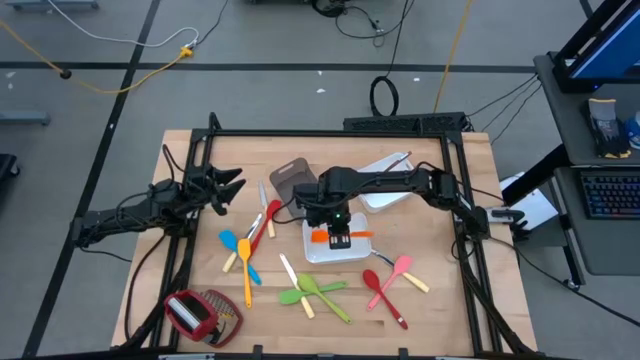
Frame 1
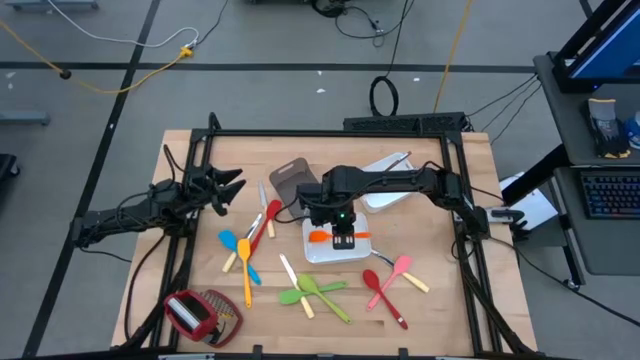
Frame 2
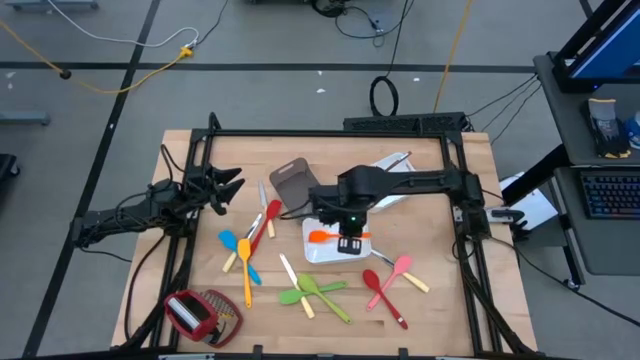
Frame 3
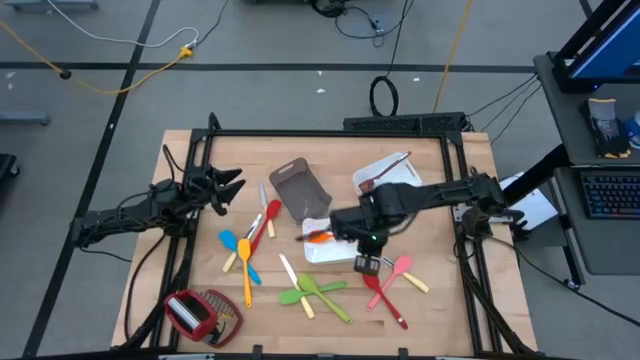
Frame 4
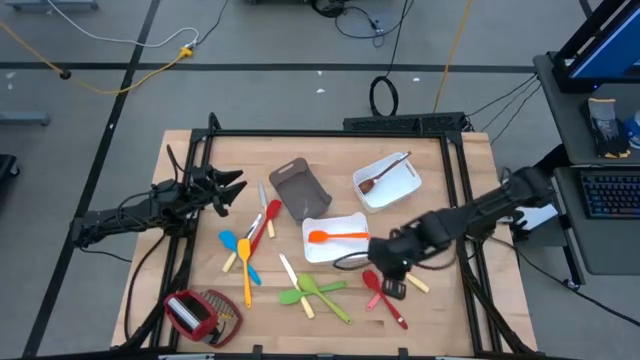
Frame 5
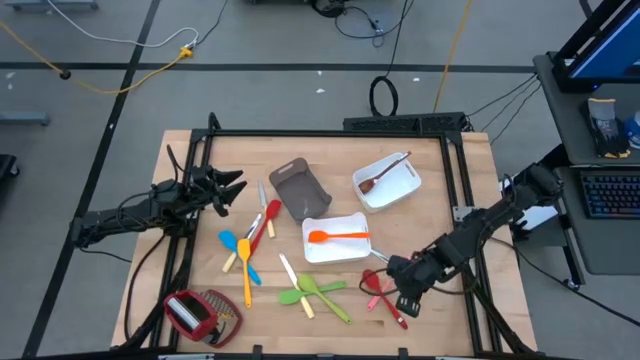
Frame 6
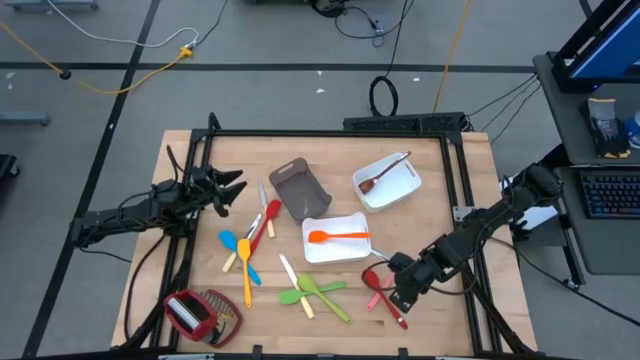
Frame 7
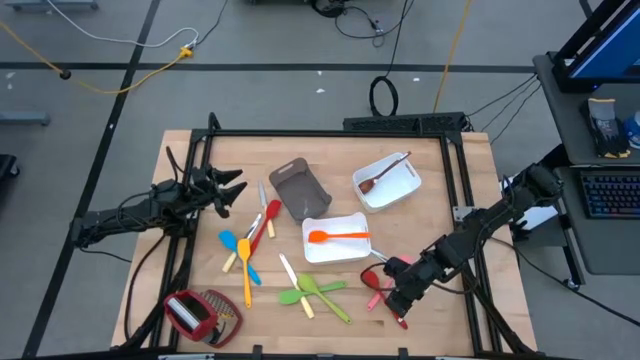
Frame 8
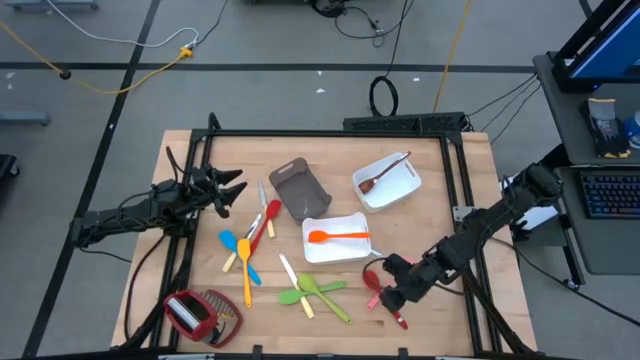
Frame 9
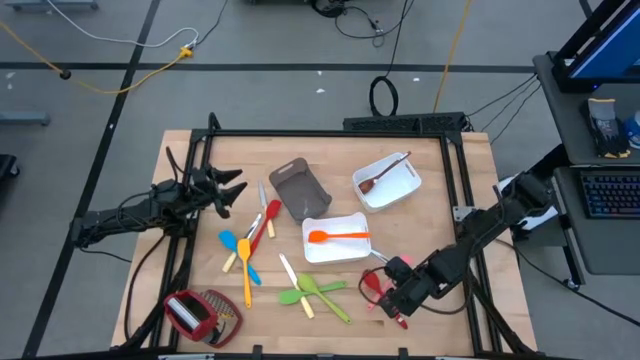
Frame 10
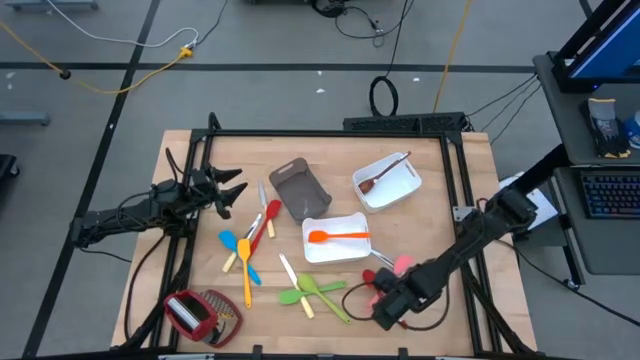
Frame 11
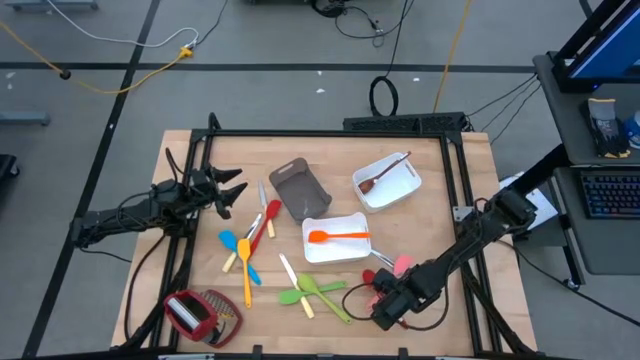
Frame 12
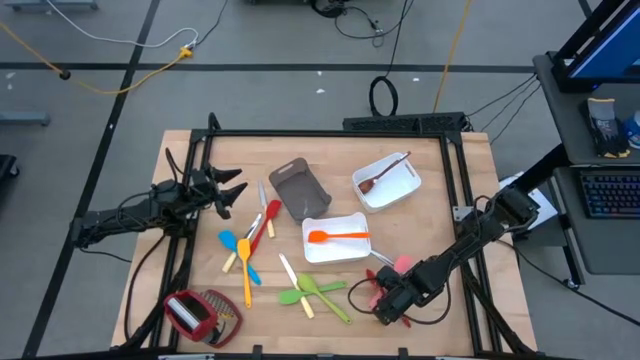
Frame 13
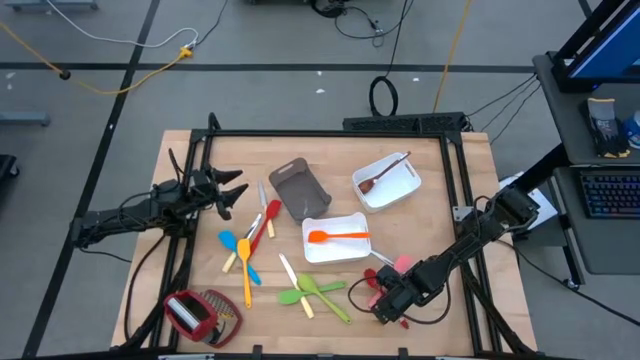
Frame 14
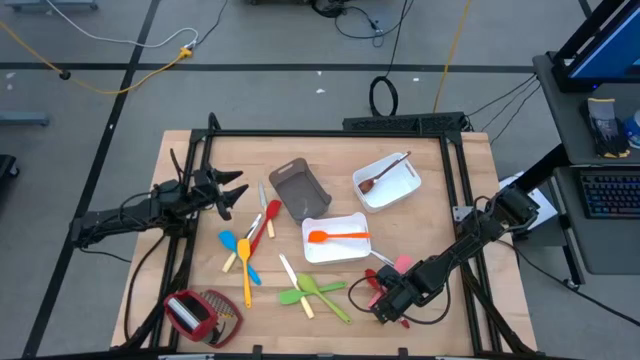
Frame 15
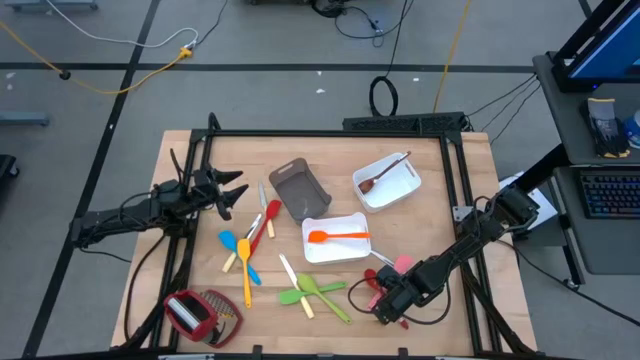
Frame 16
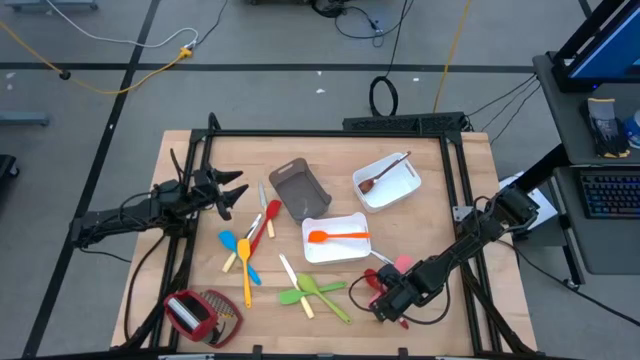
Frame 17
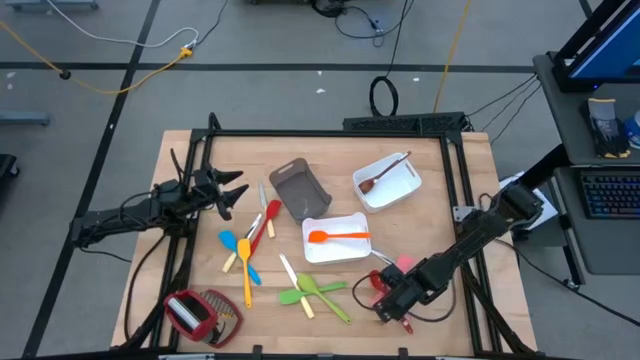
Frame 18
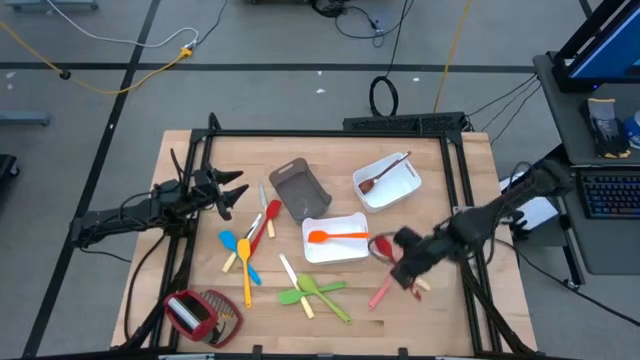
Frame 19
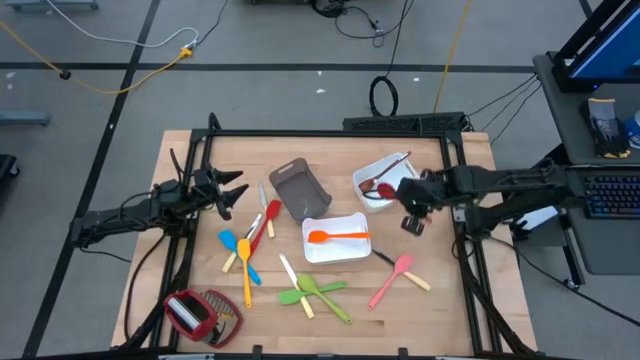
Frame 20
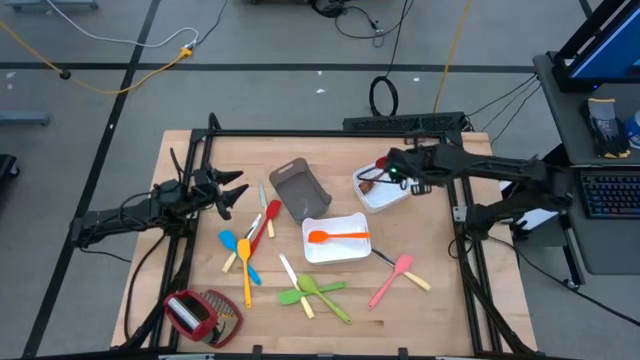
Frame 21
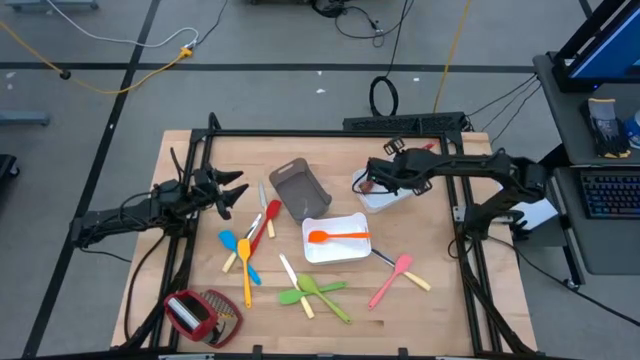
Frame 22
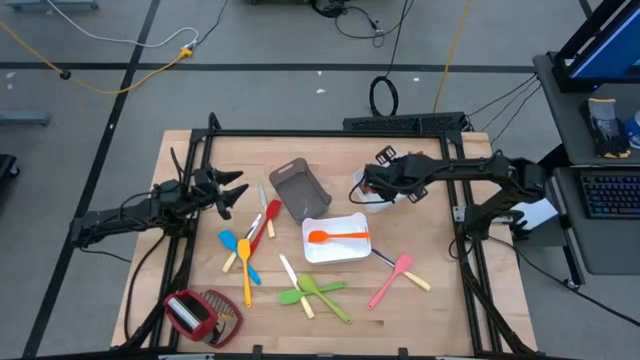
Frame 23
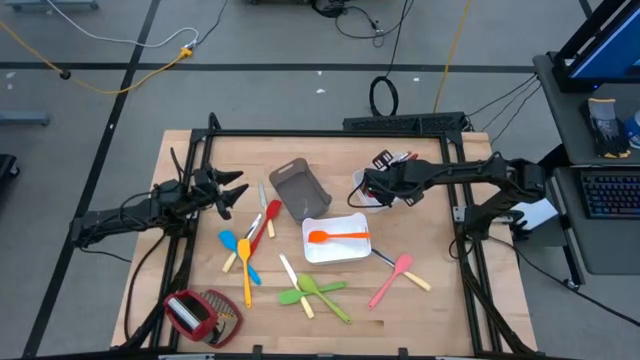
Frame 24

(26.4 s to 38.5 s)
Task: Pick & Place Kitchen Items
Put the red serving spoon into top white bin

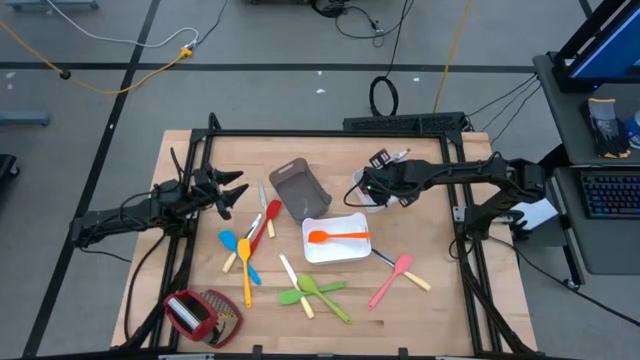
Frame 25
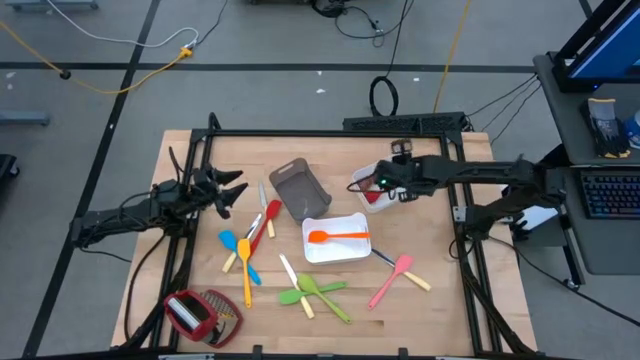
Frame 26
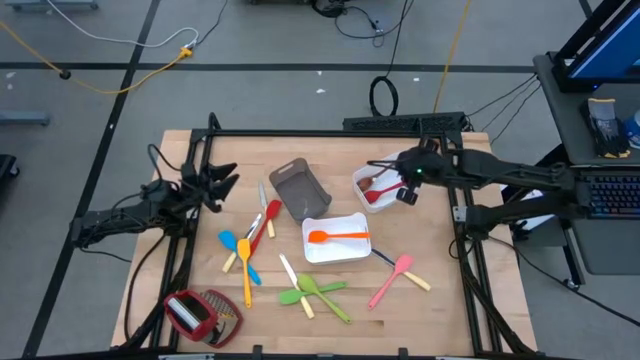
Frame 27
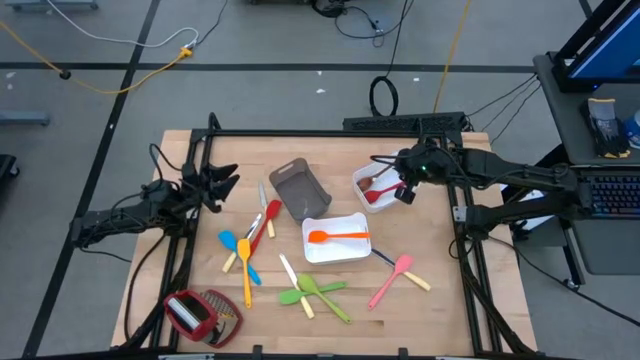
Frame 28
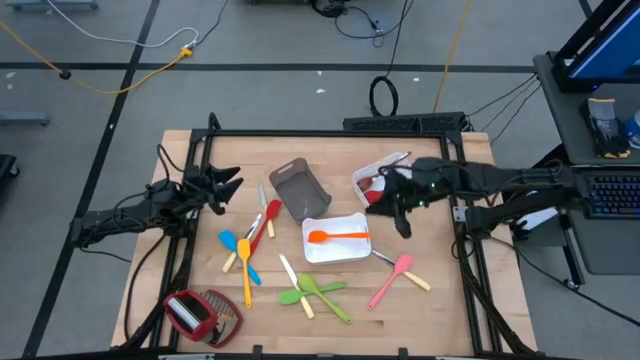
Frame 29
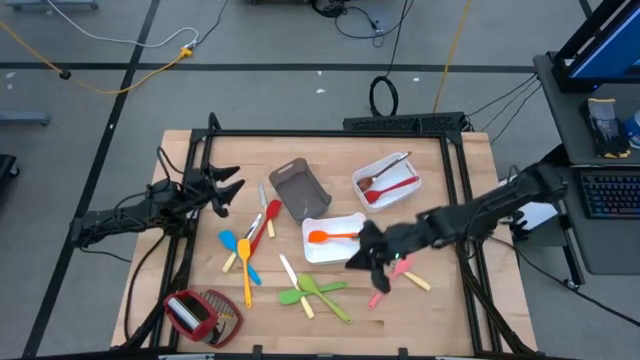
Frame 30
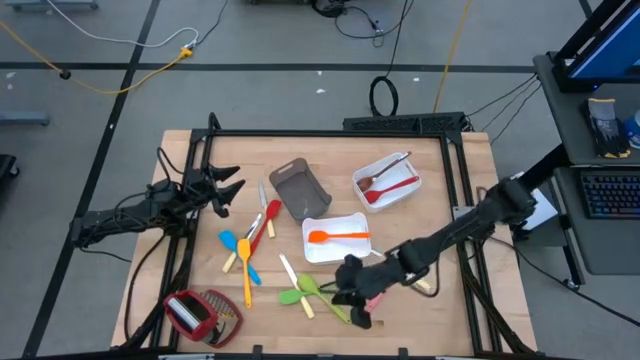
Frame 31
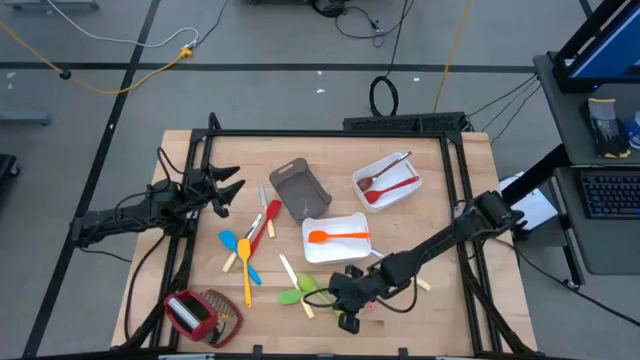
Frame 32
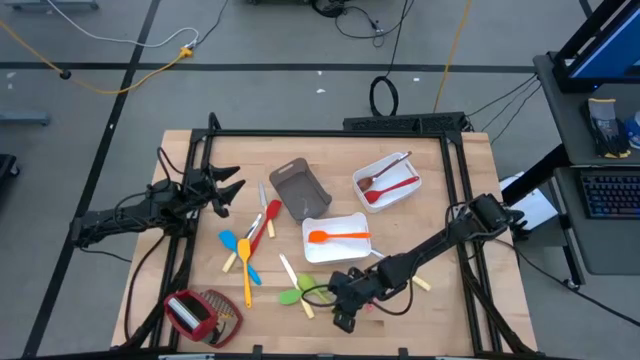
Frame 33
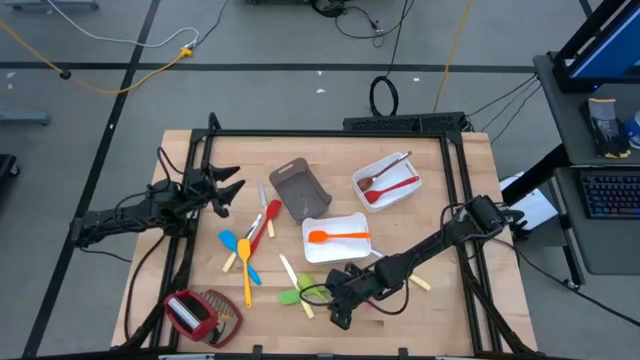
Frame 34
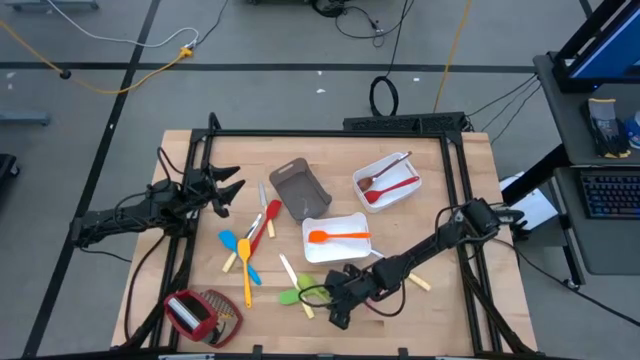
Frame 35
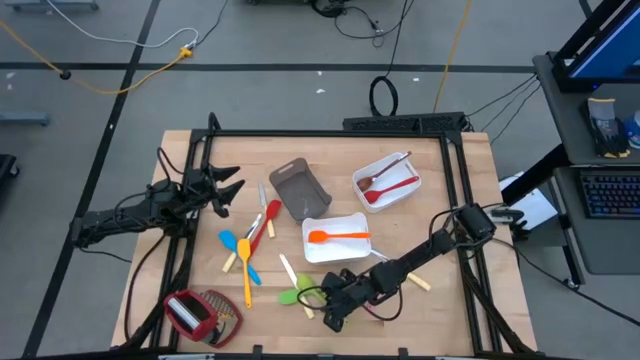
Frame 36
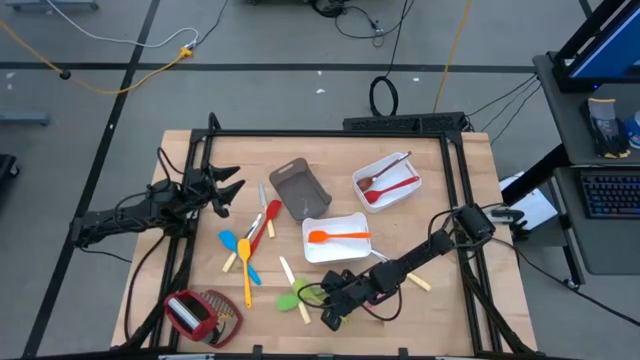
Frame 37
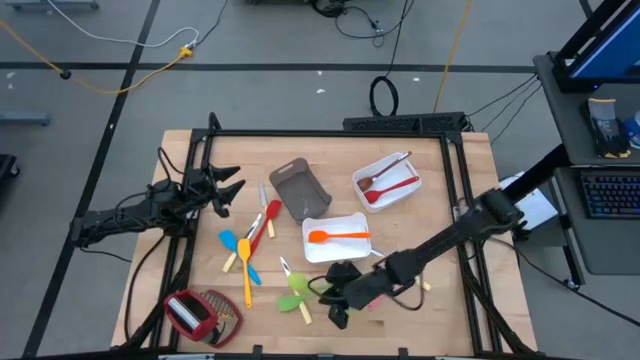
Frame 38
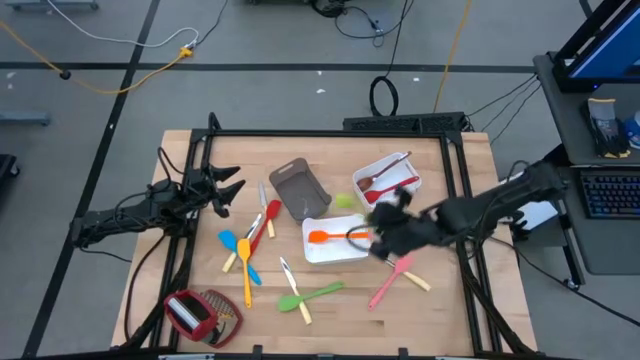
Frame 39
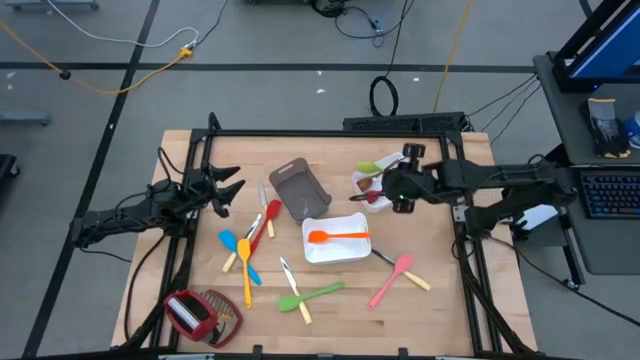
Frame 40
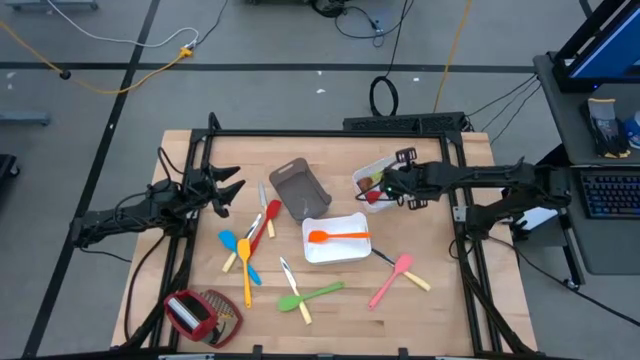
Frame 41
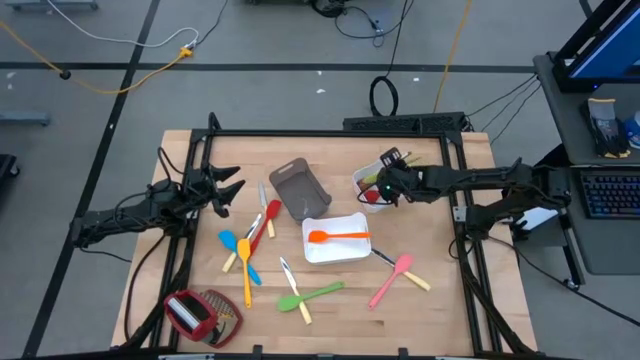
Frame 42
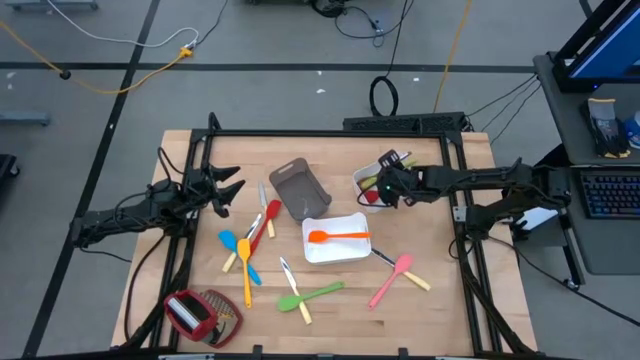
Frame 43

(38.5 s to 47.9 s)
Put the light green serving spoon into top white bin
